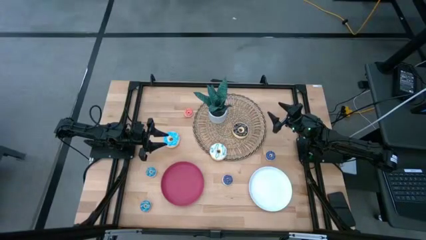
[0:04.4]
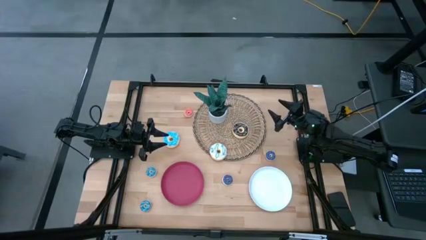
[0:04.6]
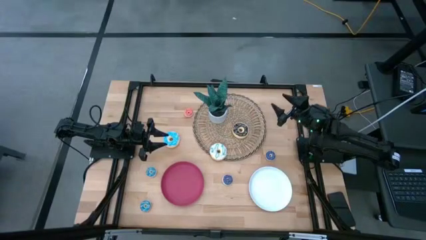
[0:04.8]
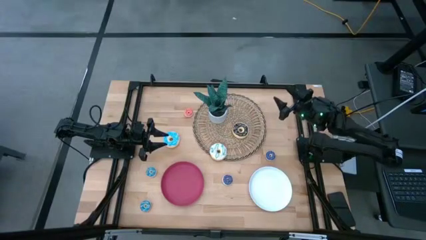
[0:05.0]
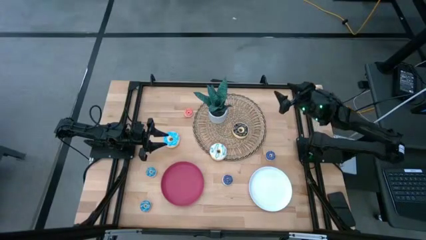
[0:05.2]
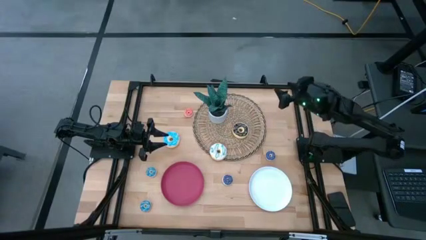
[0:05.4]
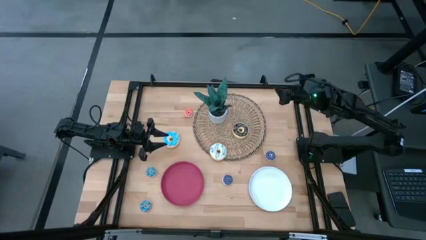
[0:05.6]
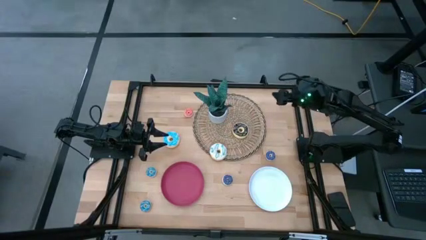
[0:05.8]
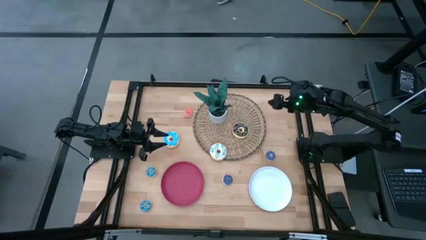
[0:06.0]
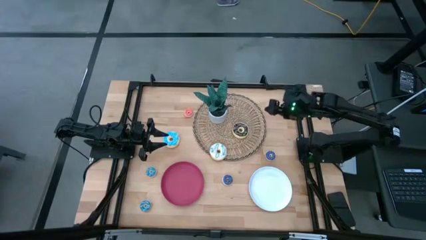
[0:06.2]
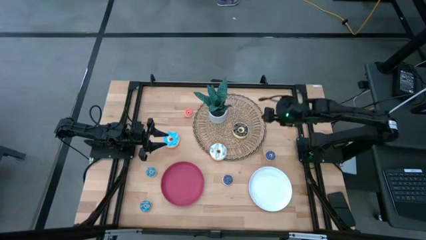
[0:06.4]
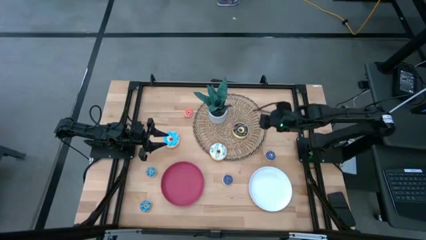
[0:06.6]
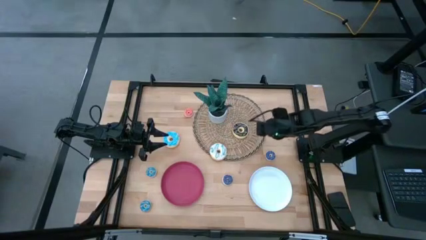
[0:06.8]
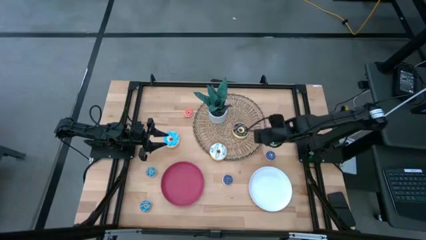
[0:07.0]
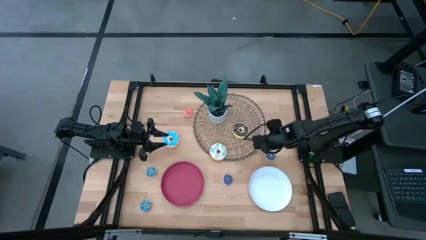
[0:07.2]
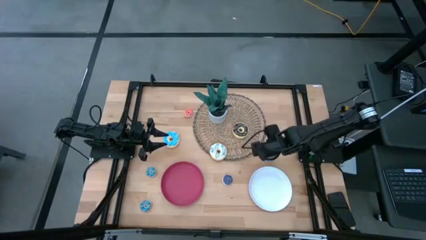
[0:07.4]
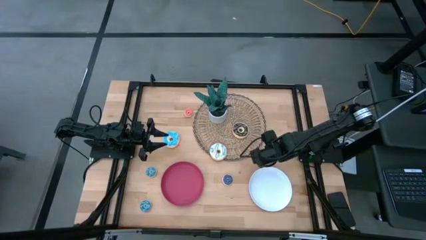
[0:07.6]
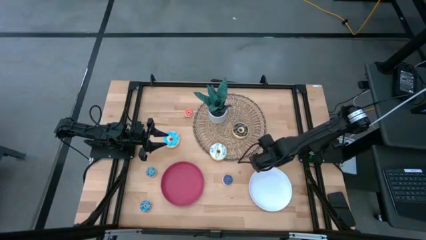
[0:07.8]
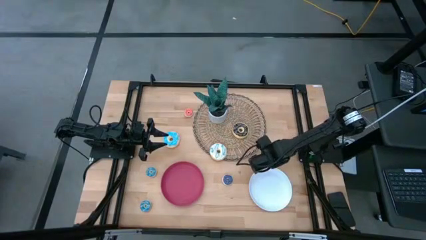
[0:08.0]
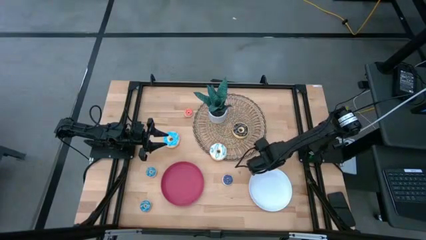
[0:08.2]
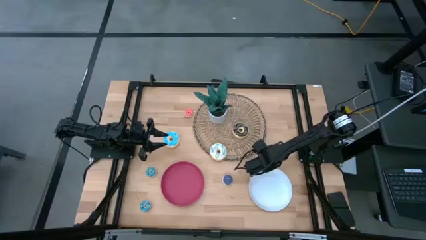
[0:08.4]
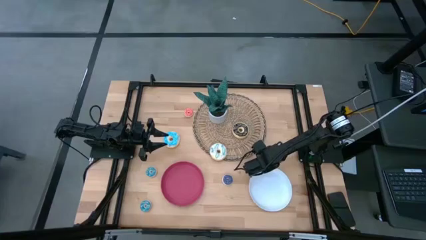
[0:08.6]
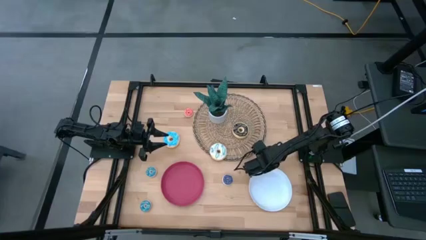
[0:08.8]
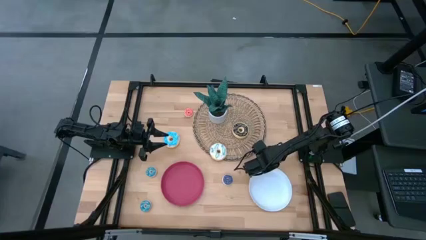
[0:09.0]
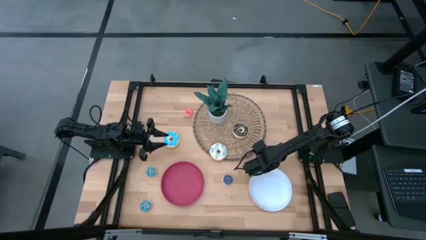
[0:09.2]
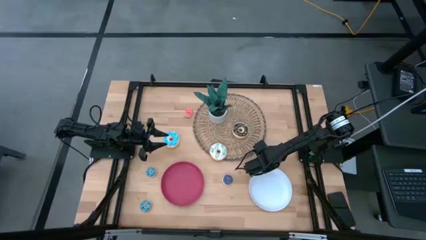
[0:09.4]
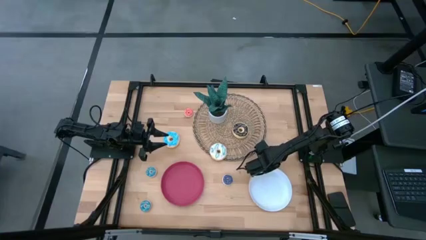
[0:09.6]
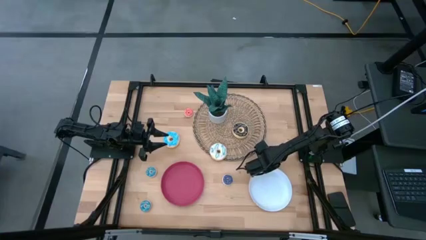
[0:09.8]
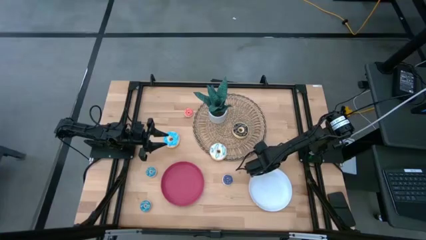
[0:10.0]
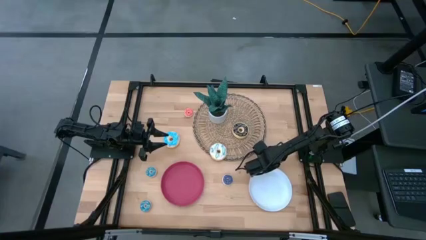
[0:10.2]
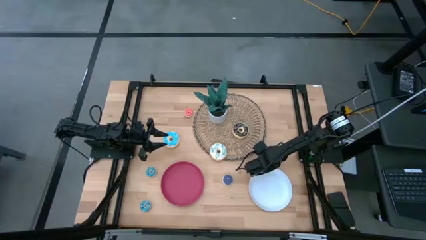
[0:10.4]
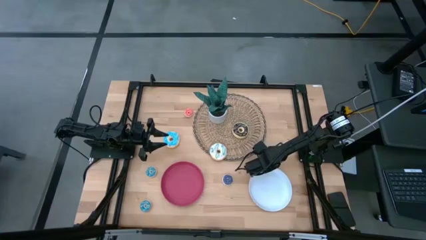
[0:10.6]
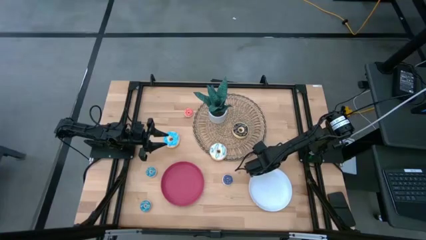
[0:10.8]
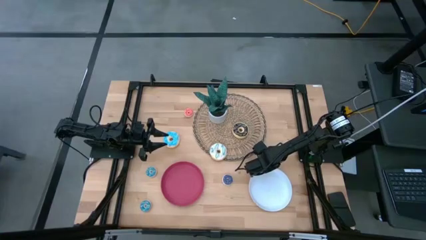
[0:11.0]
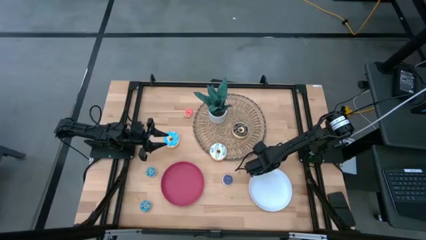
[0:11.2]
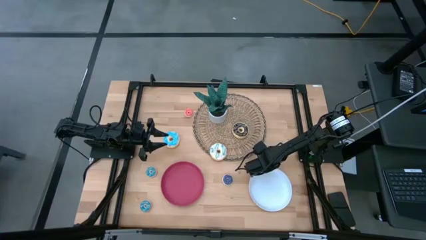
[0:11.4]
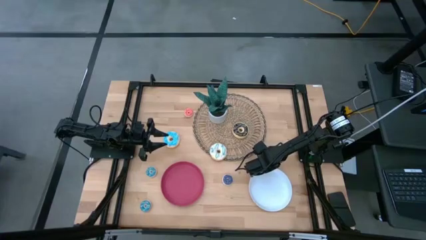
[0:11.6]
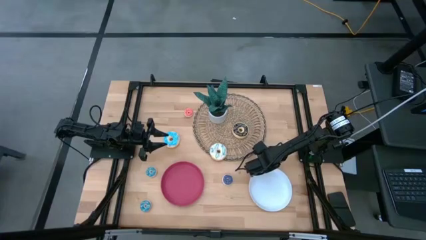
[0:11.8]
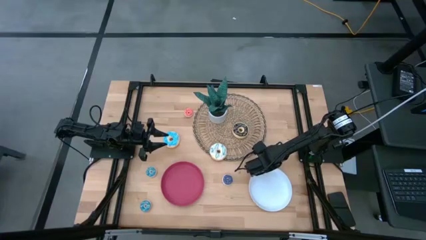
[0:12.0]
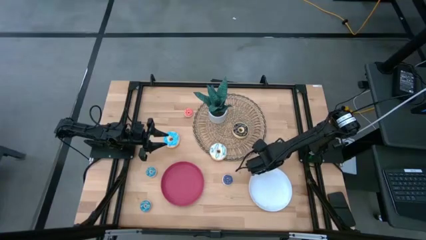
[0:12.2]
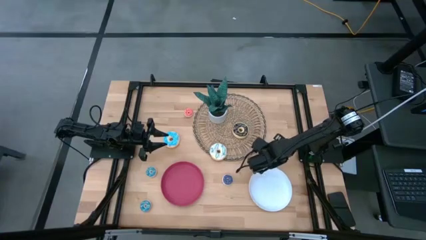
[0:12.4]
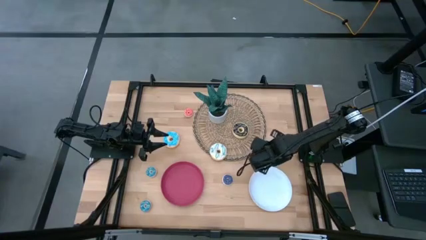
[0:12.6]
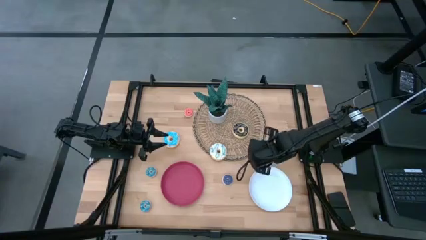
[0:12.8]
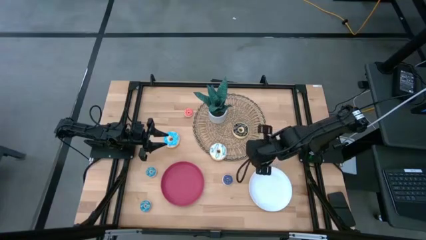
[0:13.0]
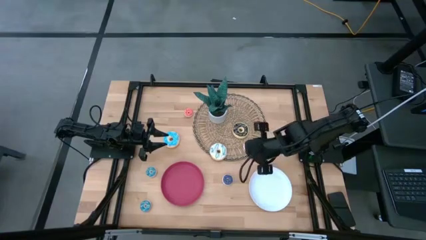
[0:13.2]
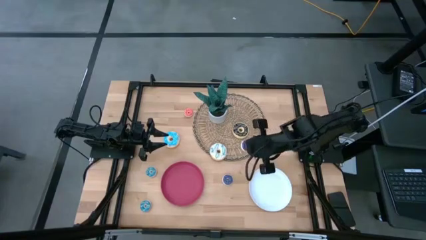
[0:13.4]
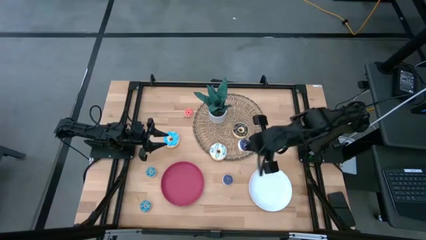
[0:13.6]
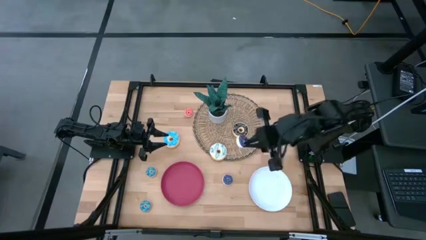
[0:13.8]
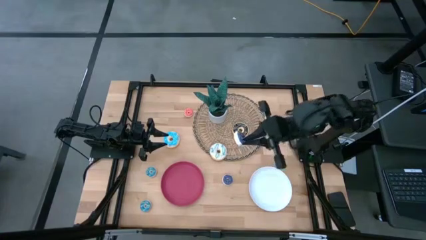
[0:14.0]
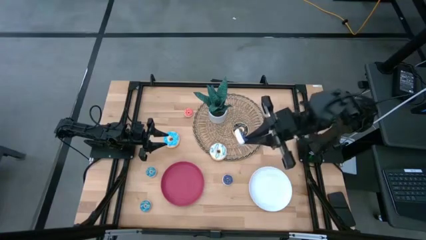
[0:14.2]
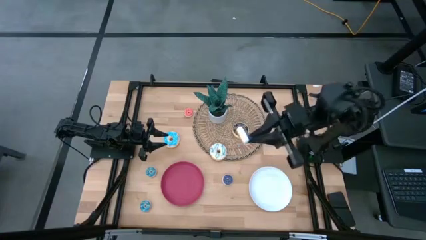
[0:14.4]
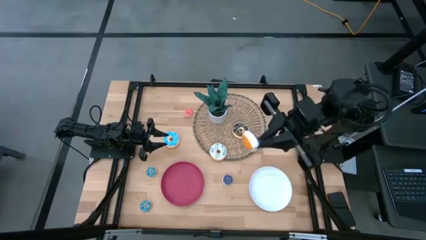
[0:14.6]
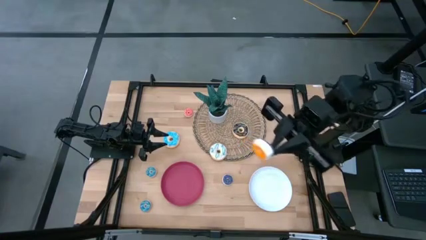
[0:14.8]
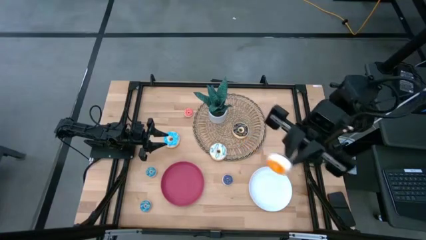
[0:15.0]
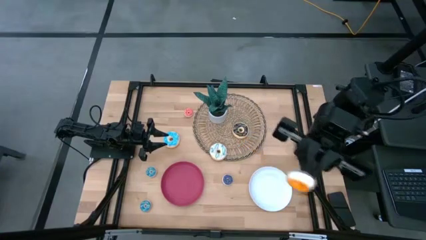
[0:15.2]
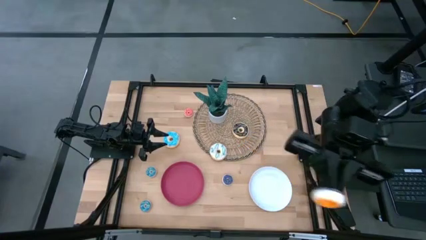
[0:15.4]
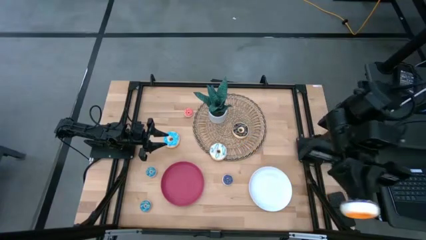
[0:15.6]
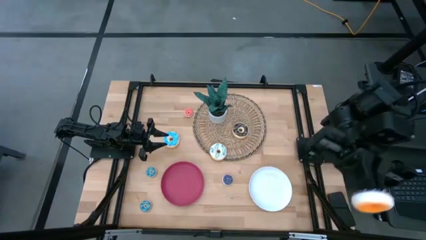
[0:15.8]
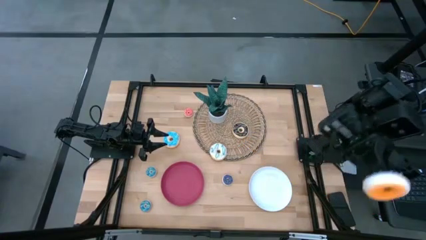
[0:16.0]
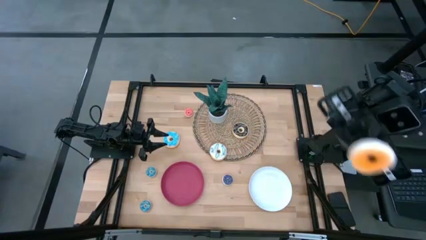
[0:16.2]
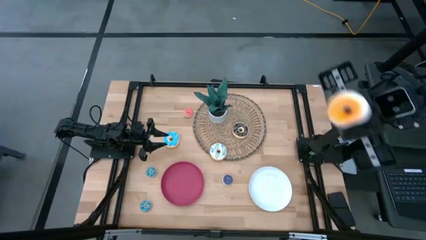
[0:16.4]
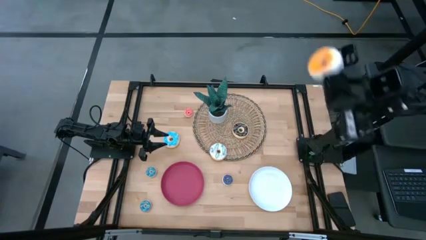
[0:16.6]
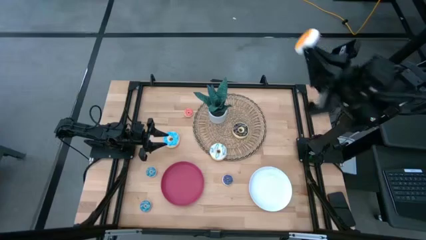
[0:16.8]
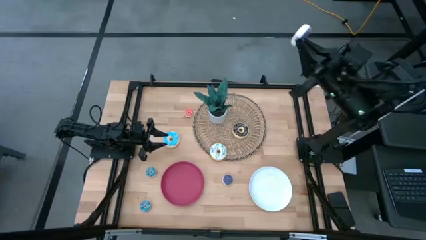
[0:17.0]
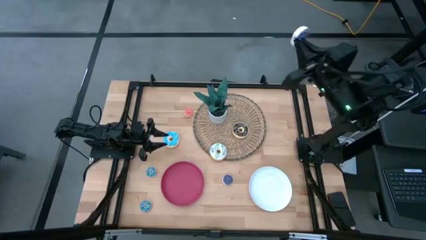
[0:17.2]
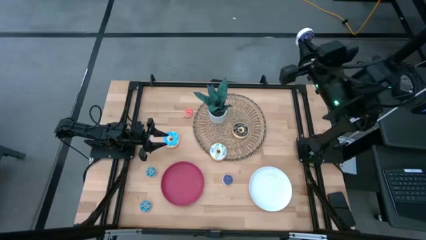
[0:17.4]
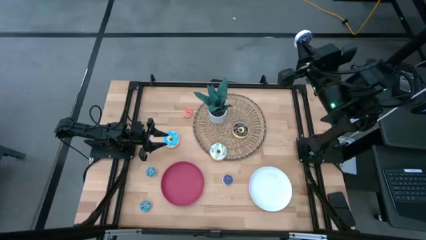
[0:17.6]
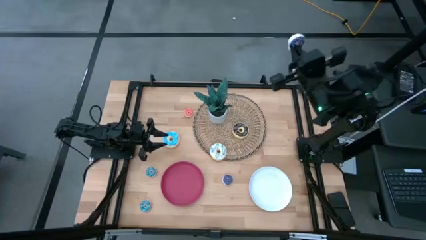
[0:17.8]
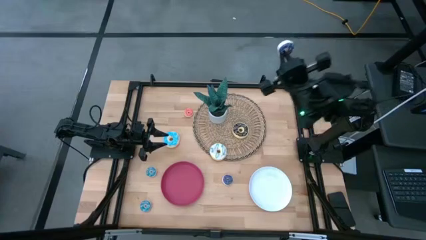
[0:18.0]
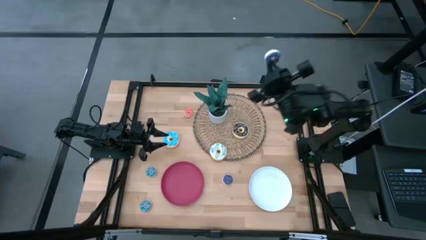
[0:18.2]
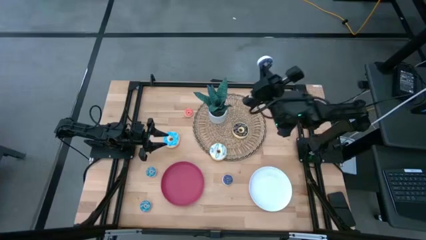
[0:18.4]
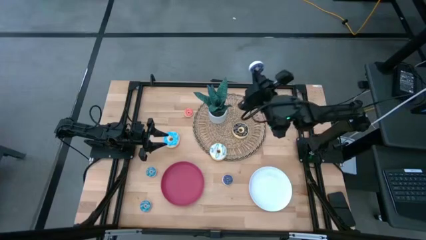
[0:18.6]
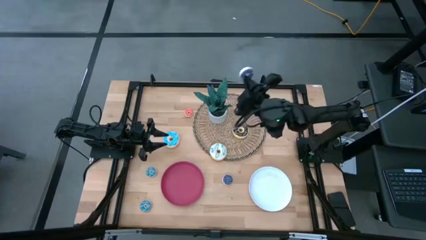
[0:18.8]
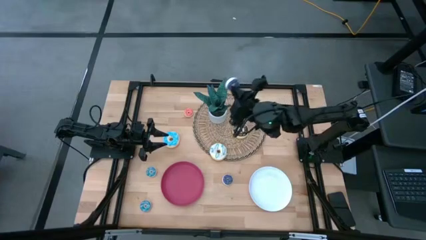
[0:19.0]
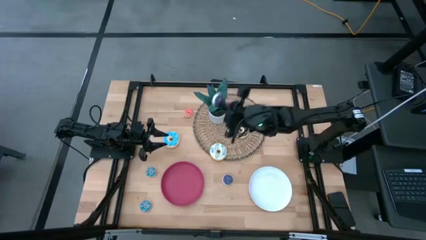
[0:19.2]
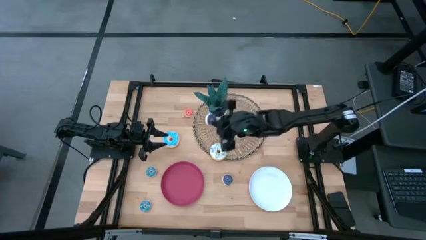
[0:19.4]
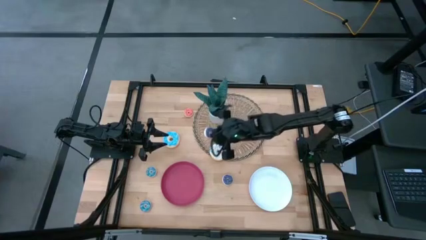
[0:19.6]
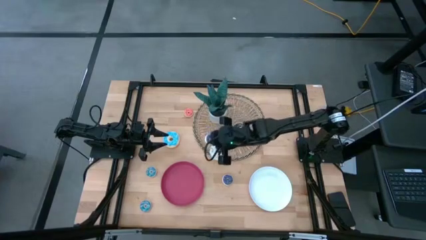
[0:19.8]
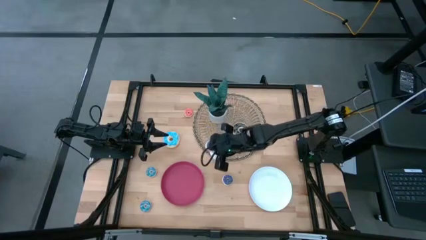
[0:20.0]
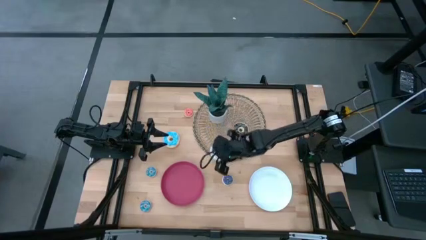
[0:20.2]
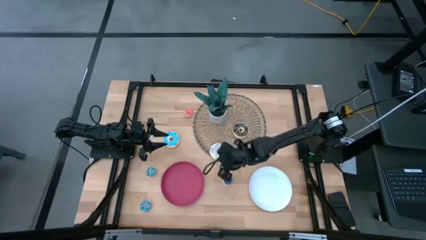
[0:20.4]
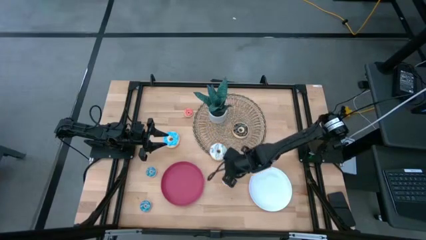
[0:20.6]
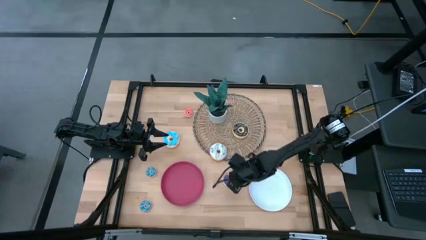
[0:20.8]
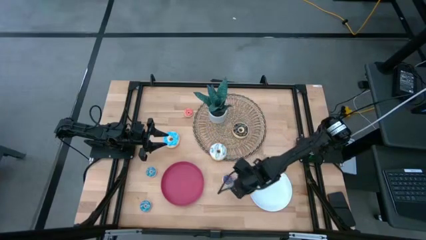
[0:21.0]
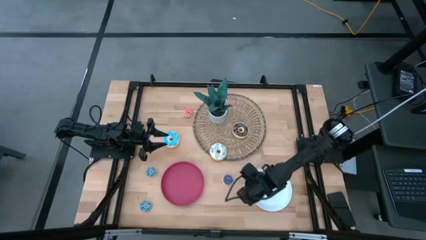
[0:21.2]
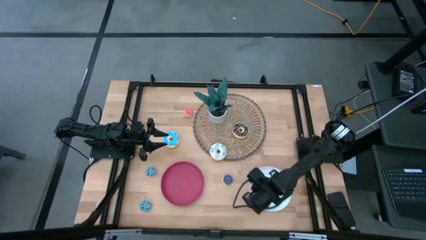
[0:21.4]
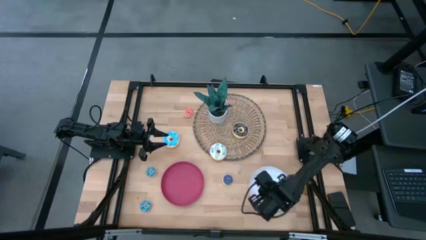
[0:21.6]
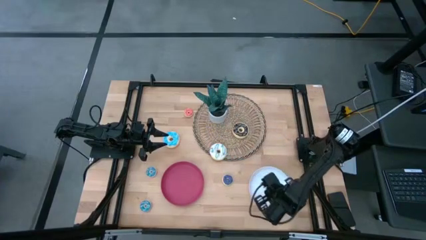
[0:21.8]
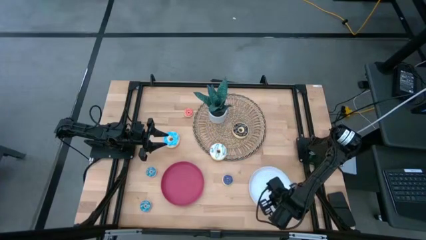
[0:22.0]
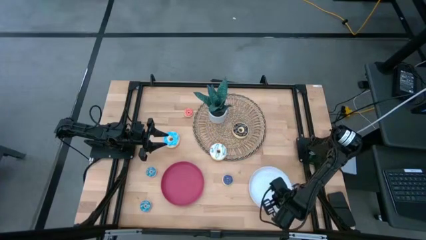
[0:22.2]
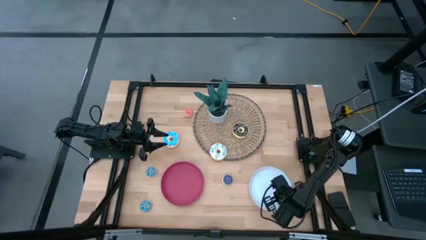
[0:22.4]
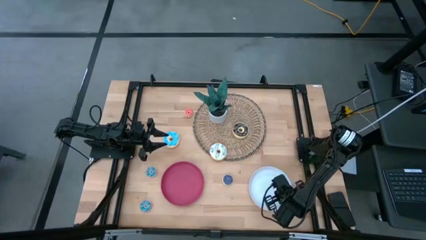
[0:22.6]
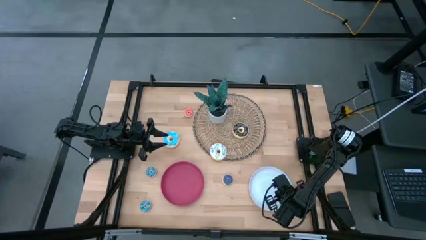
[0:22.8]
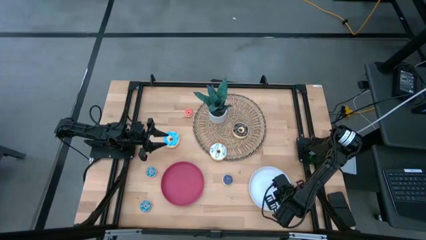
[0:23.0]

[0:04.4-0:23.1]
Task: Pick & Place donuts
Put the right dark blue donut on the white plate
